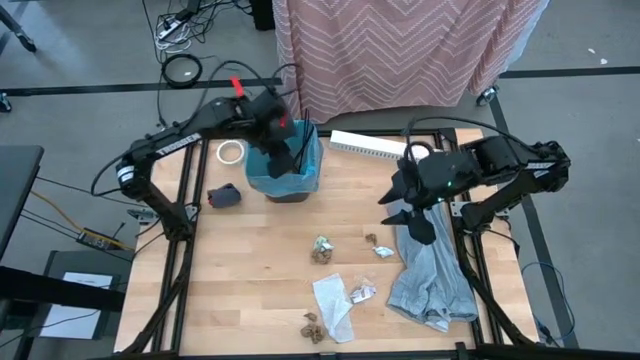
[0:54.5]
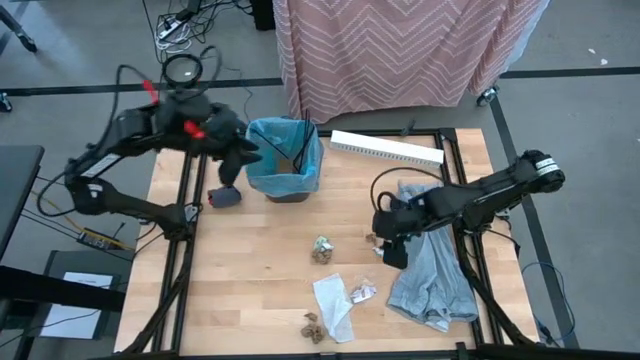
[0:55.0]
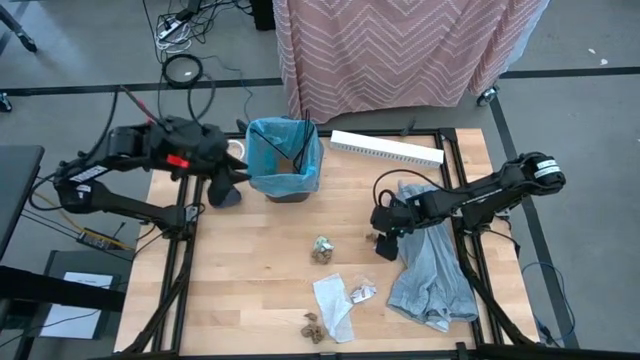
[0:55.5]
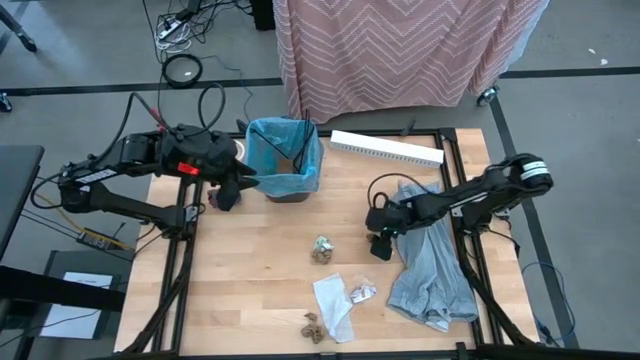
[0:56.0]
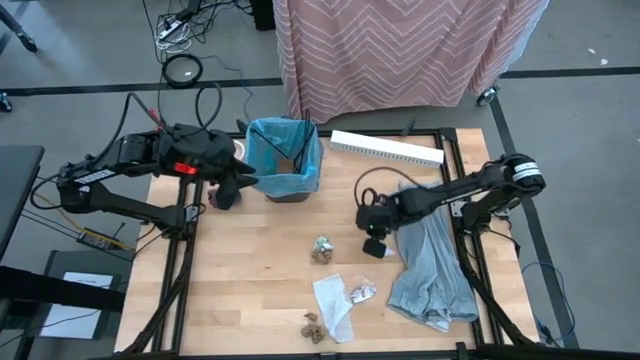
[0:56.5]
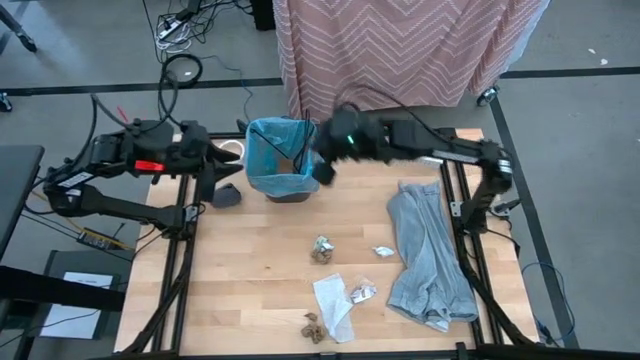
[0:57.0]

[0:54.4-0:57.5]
Task: place trash/remove bag and relplace
Put the brown napkin into the black trash bin

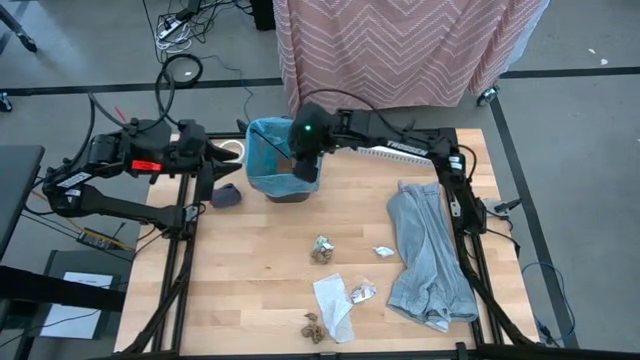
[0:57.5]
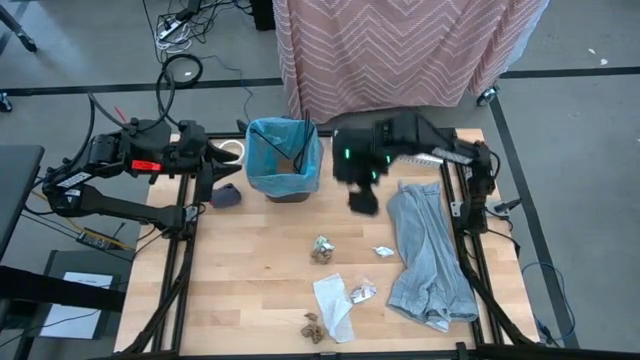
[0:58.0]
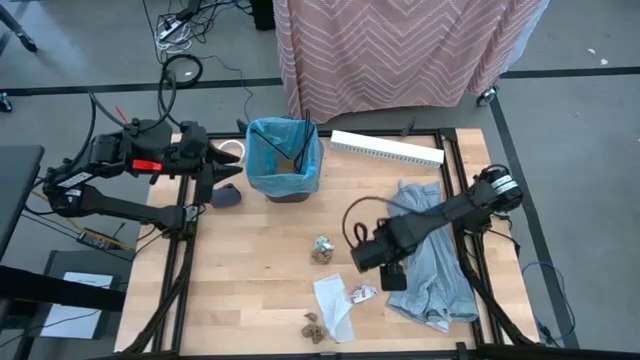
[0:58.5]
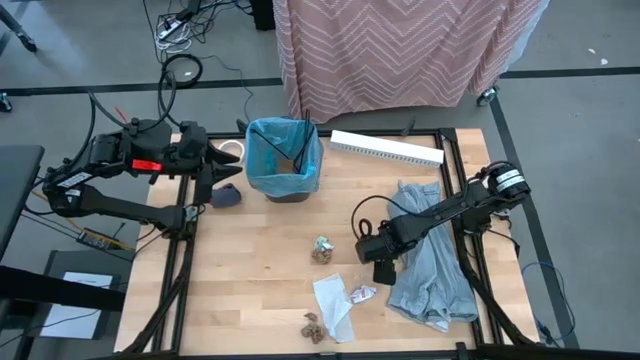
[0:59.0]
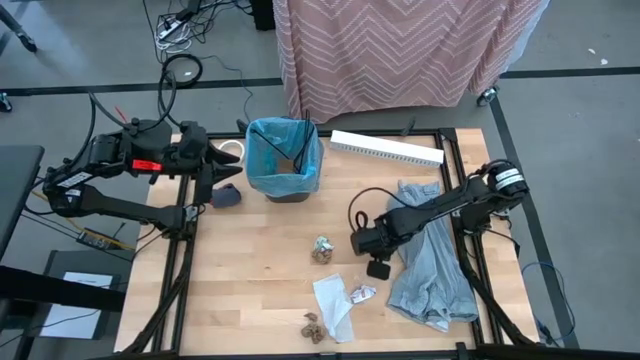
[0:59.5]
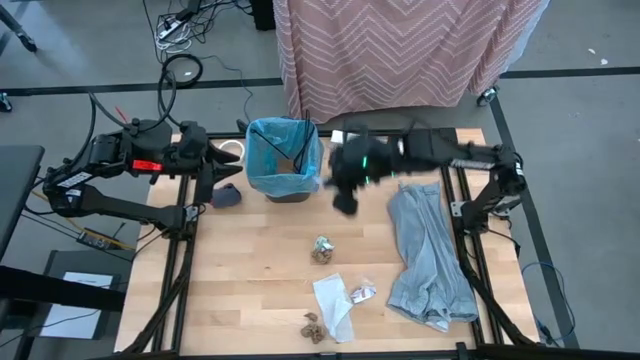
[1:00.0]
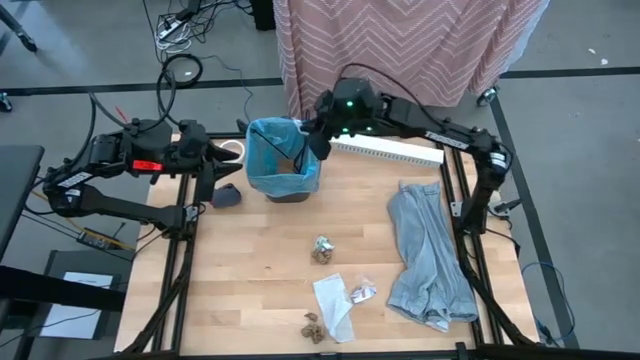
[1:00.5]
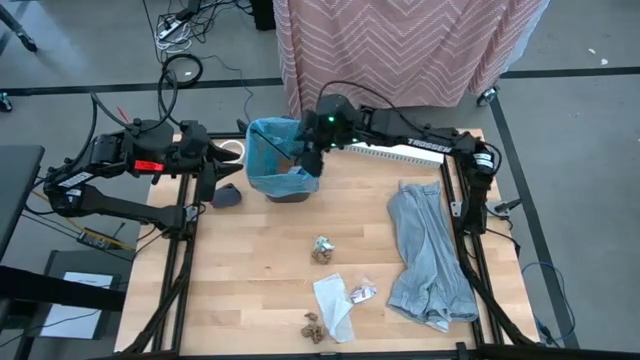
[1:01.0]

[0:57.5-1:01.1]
Put the white paper into the black trash bin

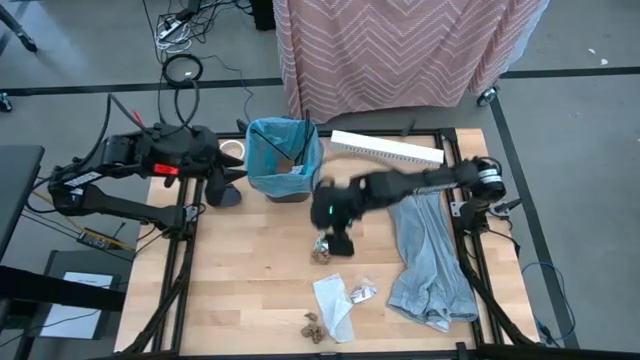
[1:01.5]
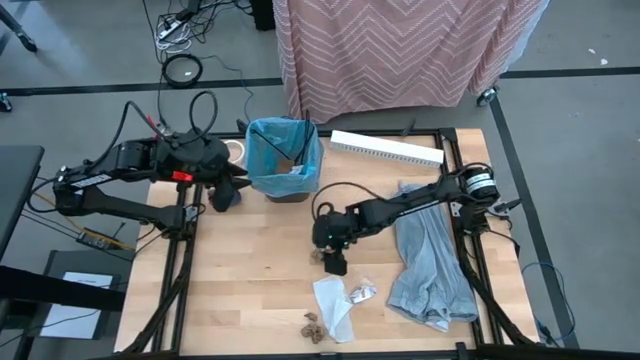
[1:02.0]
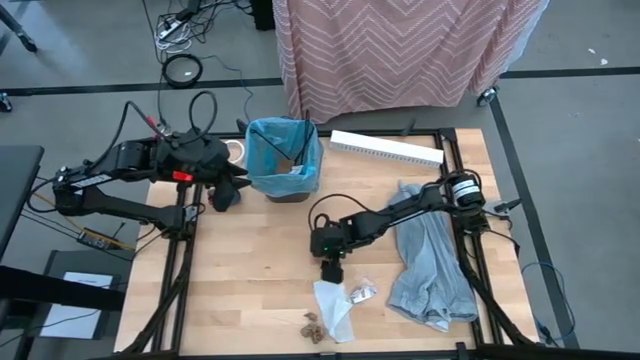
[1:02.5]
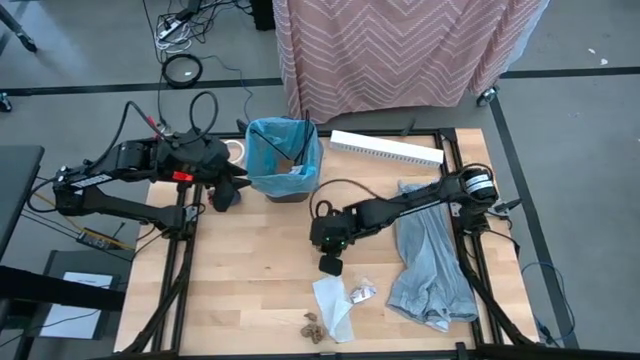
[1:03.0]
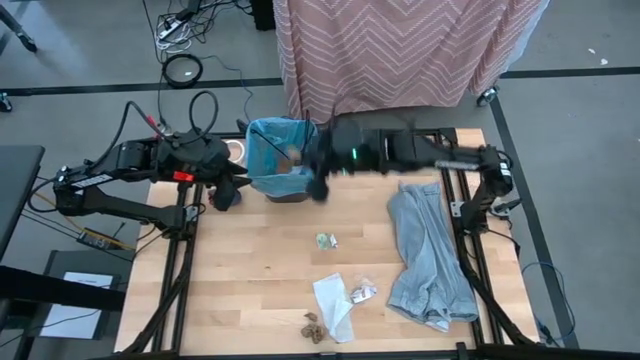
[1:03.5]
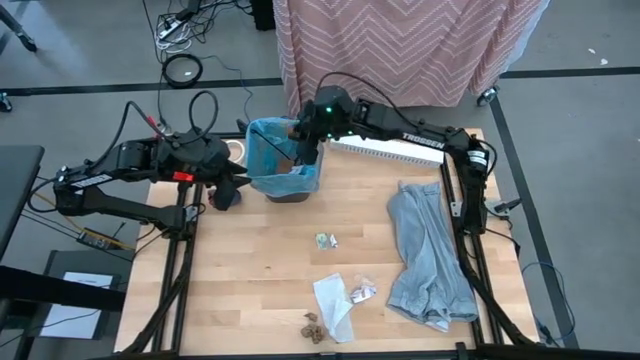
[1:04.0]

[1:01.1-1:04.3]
Put the brown napkin into the black trash bin

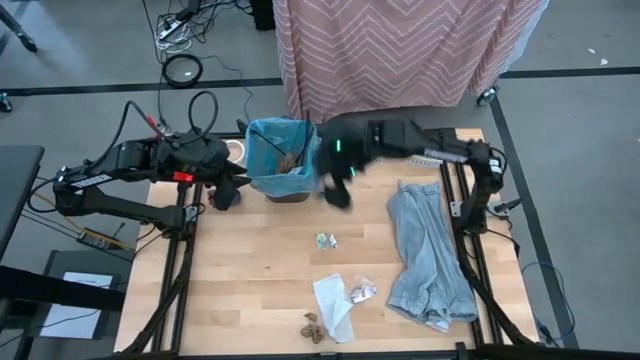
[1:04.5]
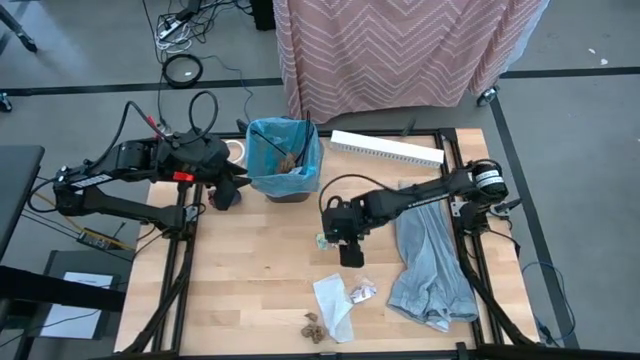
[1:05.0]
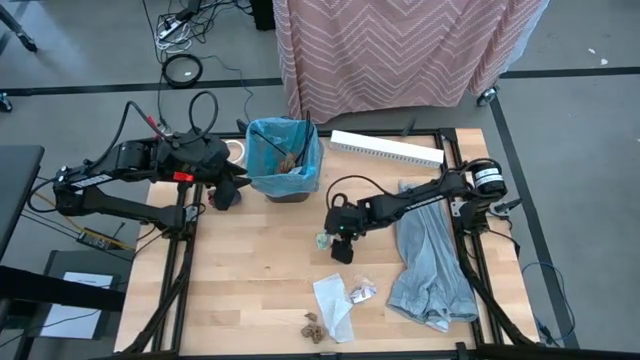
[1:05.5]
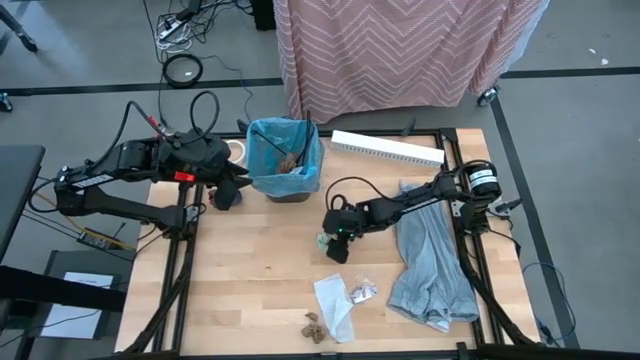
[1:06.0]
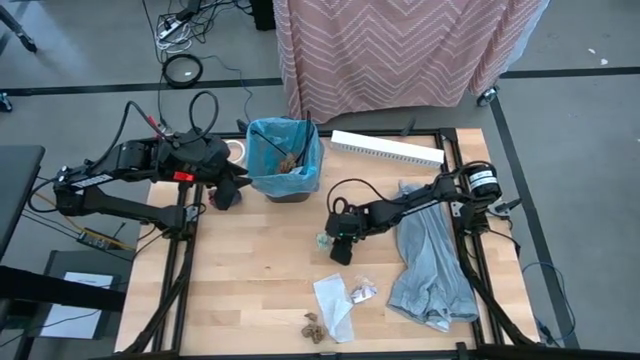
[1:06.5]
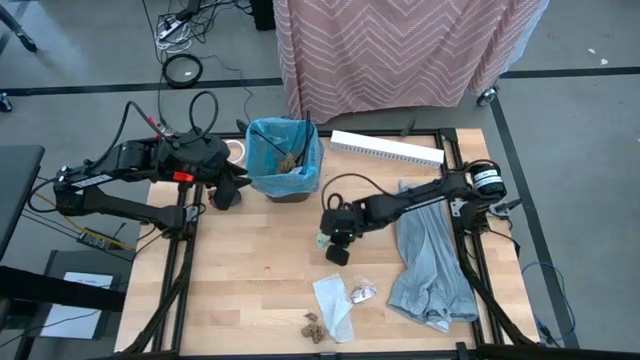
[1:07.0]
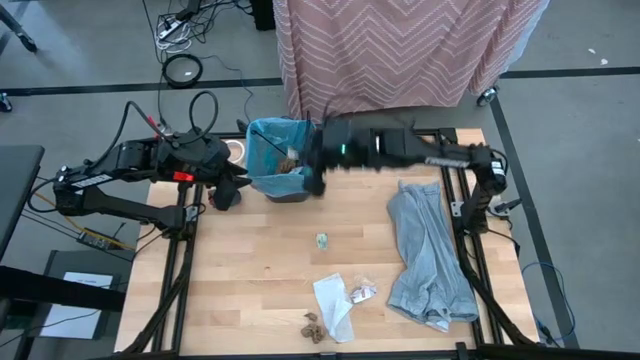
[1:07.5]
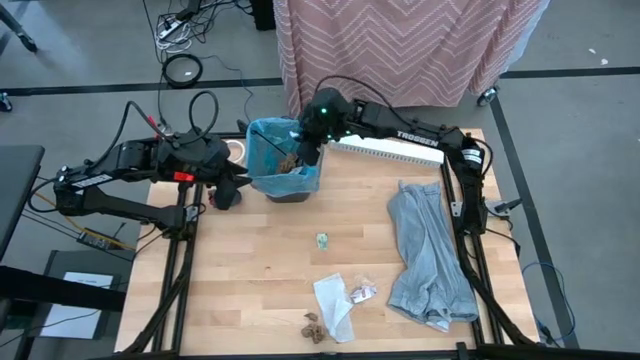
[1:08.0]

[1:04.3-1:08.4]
Put the white paper into the black trash bin

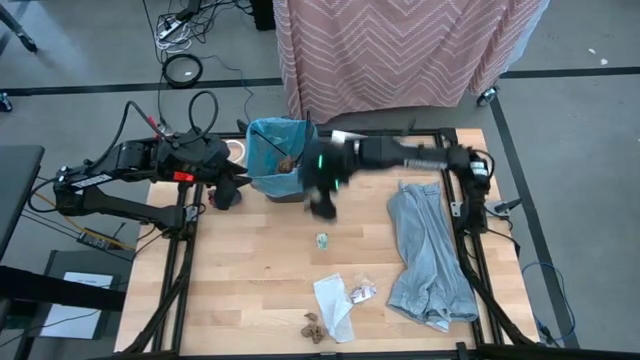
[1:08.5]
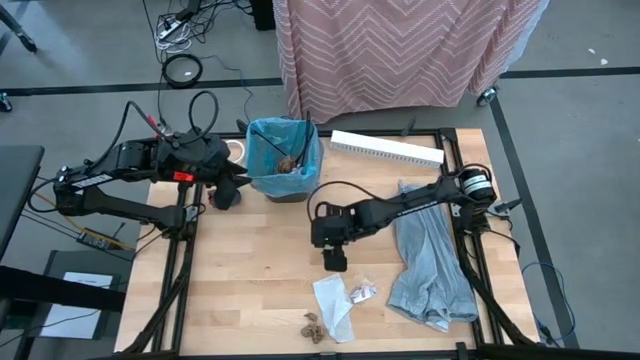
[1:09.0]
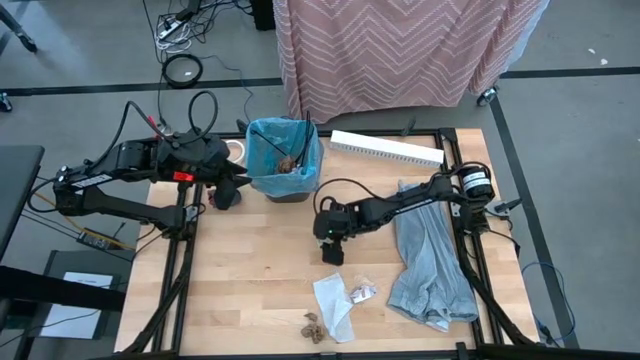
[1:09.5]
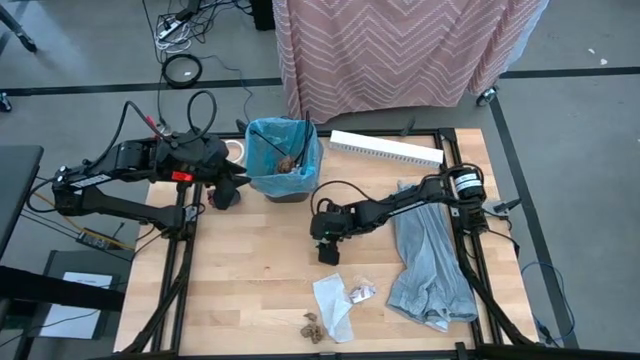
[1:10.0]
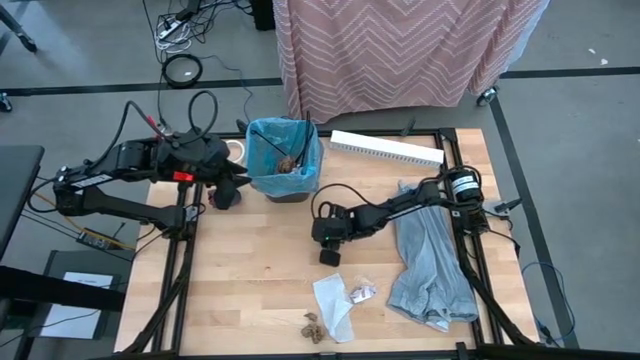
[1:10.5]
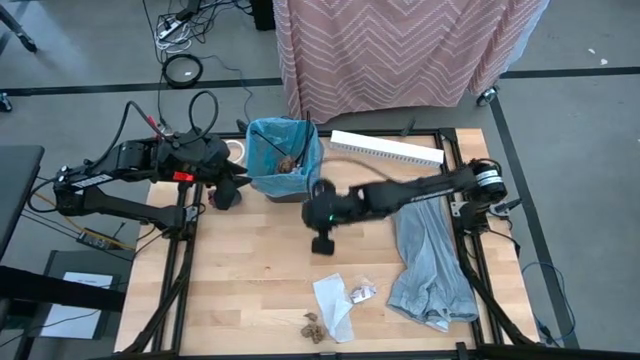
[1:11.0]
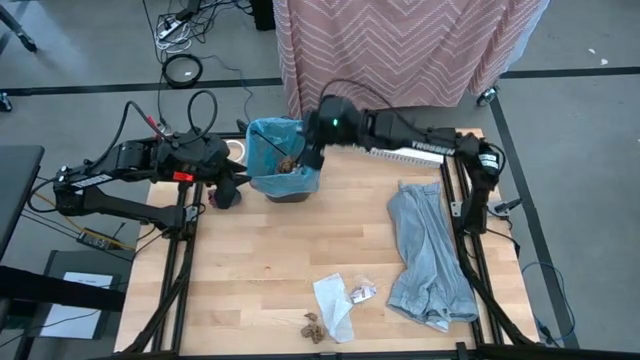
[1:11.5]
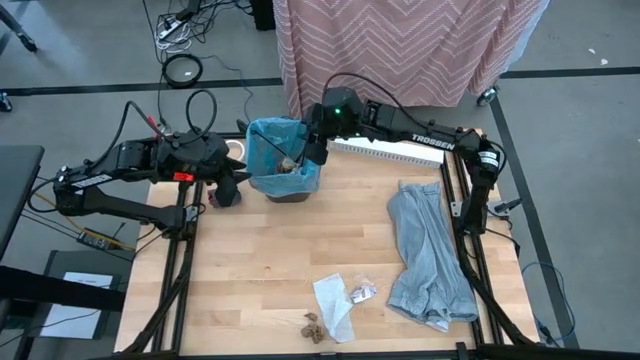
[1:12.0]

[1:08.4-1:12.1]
Put the white candy wrapper into the black trash bin

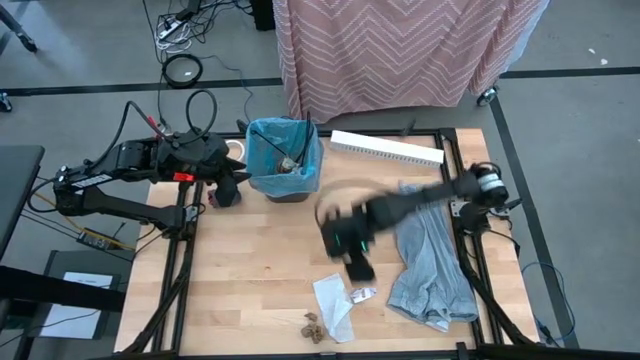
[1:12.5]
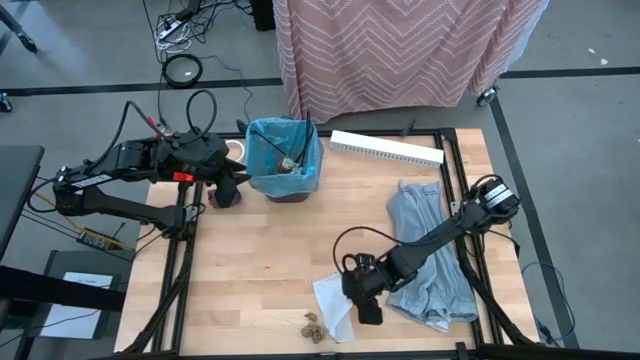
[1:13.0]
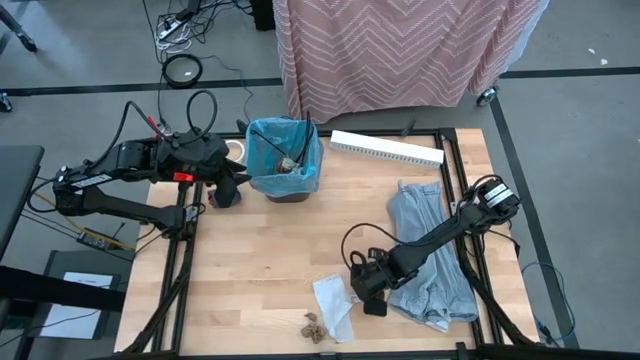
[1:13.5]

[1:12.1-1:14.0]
Put the white paper into the black trash bin

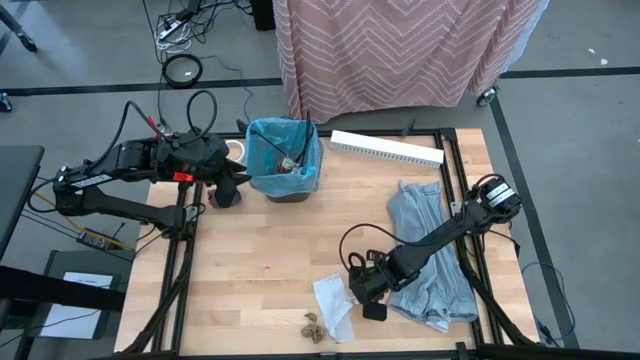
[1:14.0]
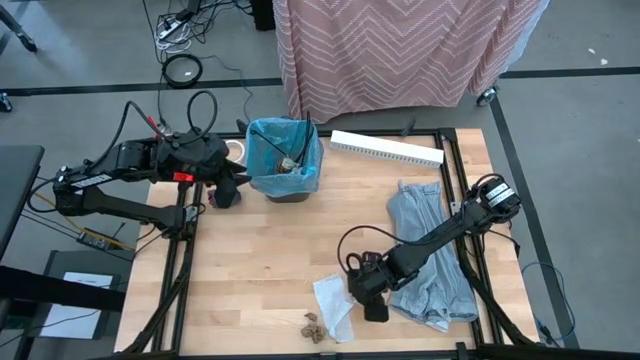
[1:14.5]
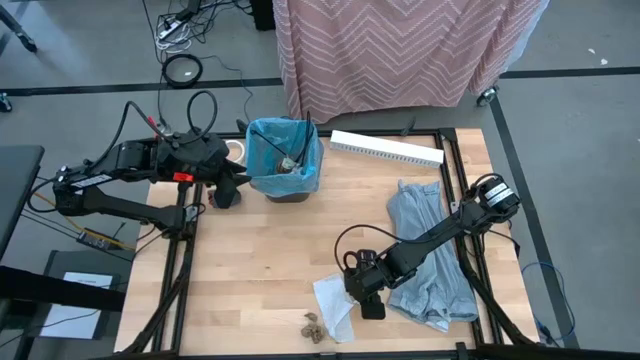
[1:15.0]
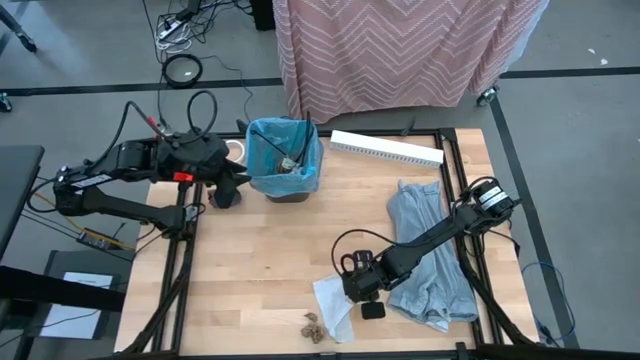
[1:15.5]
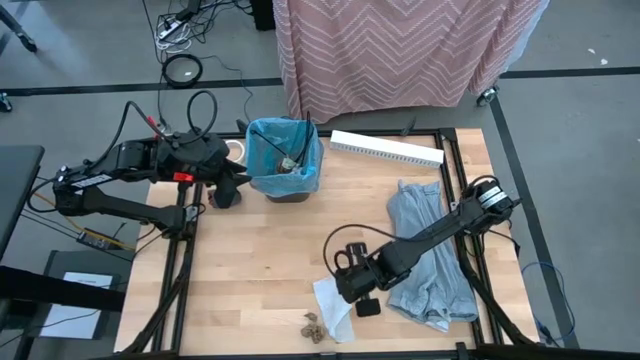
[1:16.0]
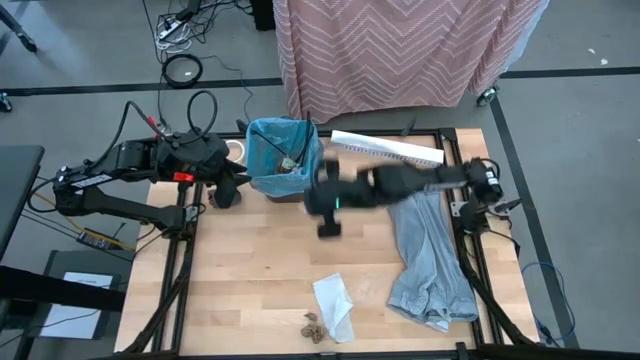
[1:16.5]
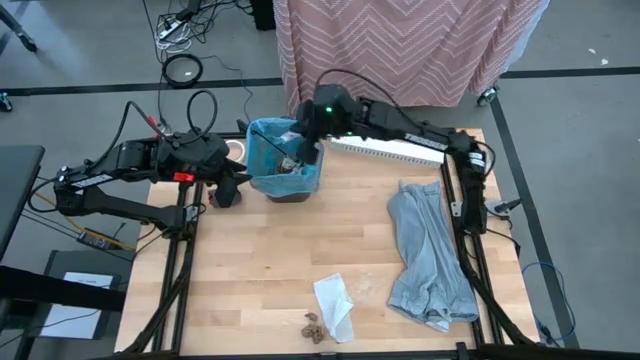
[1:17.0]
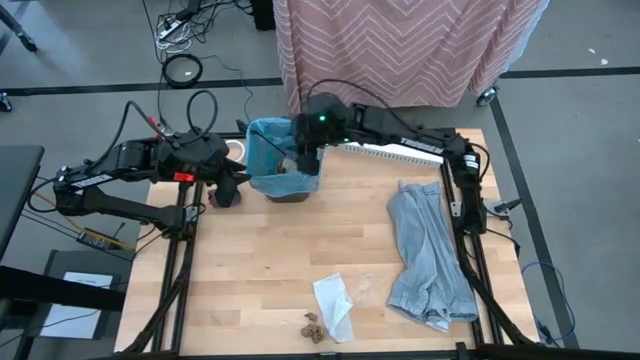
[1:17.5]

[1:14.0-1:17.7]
Put the white paper into the black trash bin
